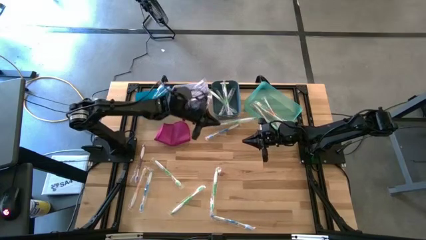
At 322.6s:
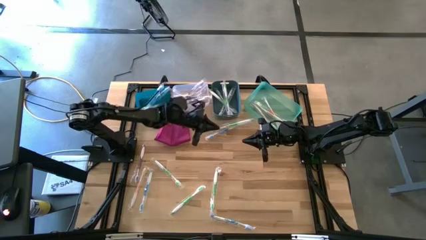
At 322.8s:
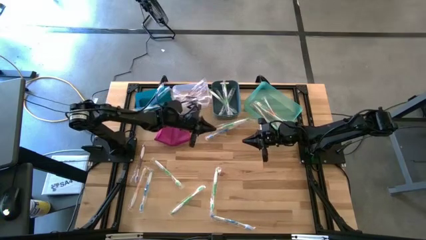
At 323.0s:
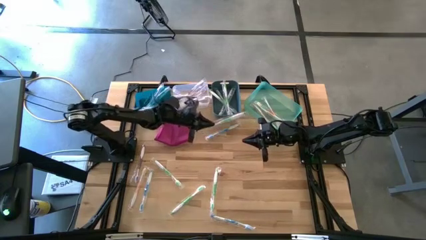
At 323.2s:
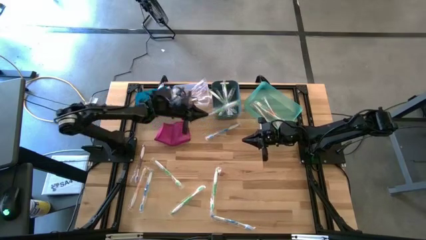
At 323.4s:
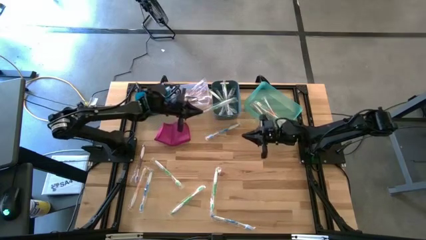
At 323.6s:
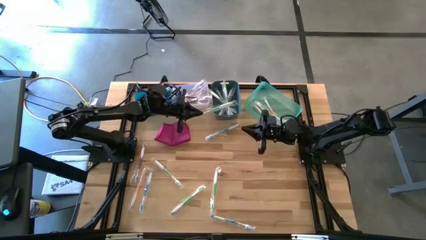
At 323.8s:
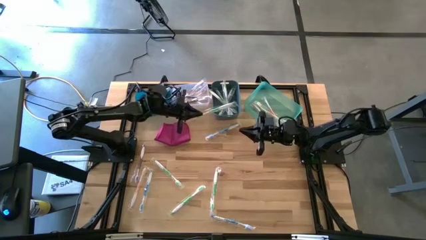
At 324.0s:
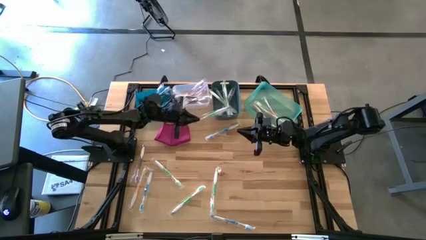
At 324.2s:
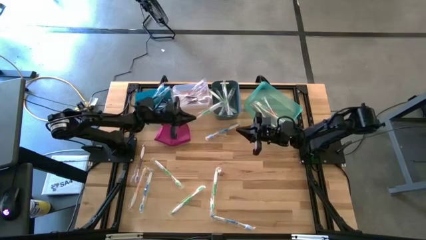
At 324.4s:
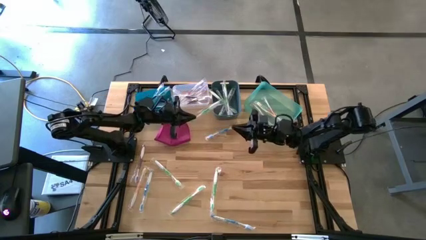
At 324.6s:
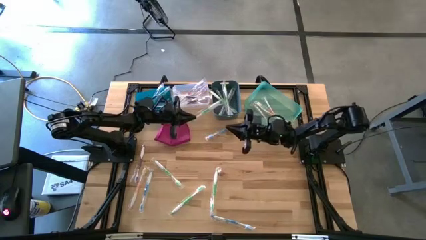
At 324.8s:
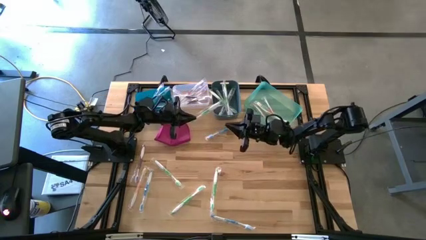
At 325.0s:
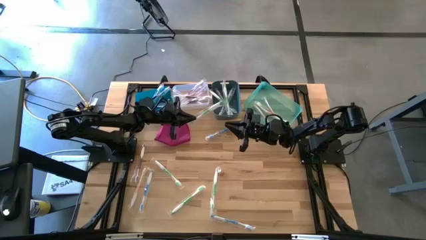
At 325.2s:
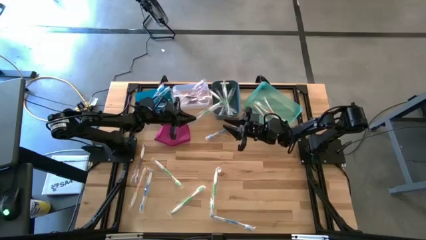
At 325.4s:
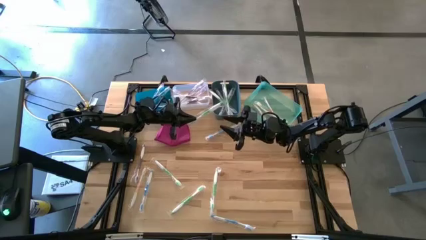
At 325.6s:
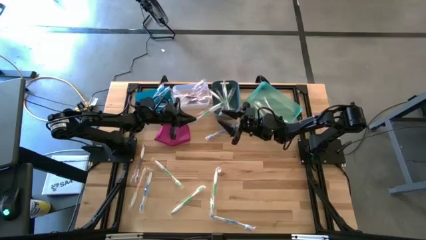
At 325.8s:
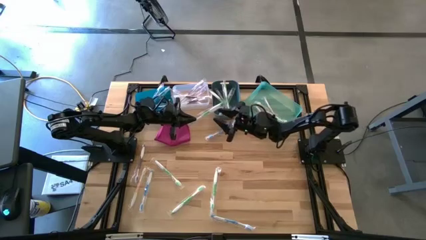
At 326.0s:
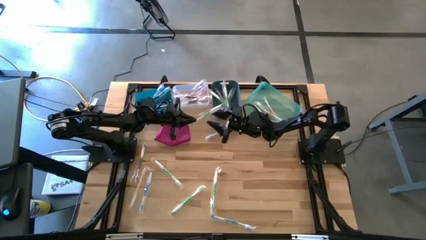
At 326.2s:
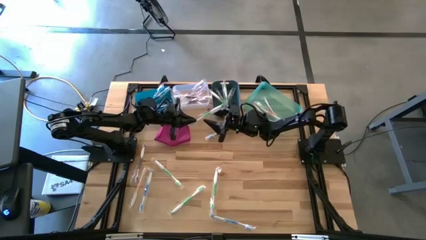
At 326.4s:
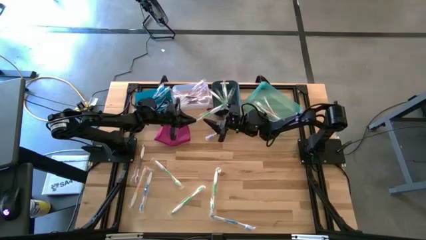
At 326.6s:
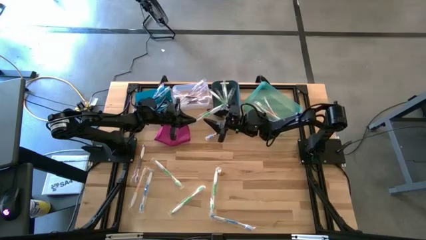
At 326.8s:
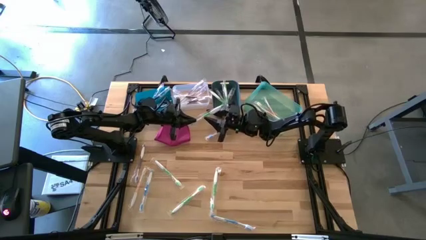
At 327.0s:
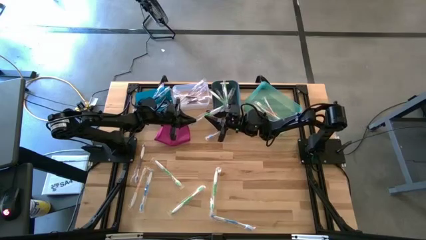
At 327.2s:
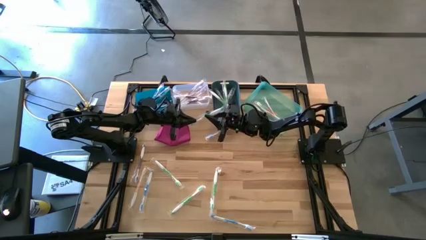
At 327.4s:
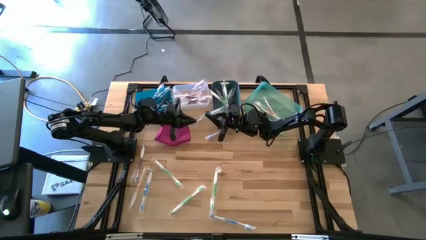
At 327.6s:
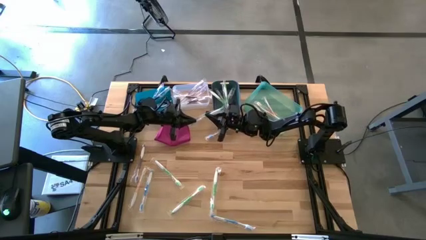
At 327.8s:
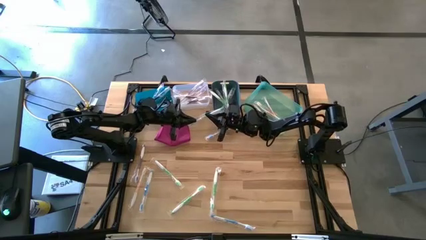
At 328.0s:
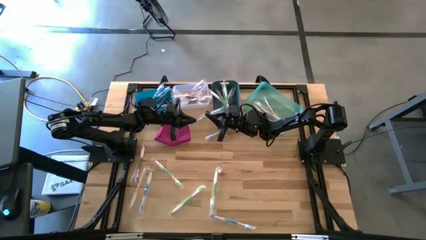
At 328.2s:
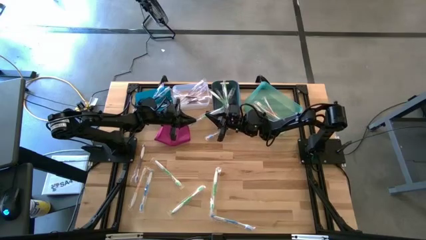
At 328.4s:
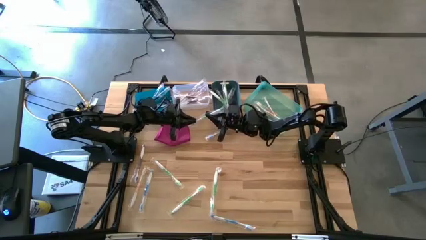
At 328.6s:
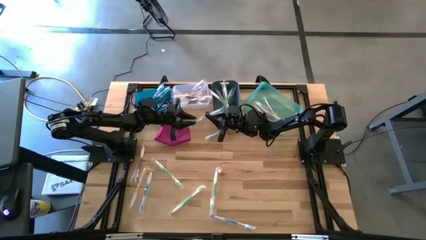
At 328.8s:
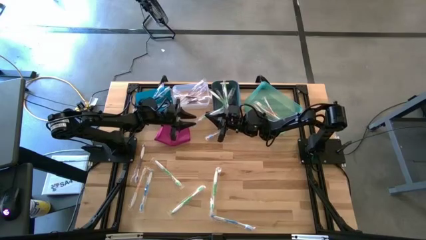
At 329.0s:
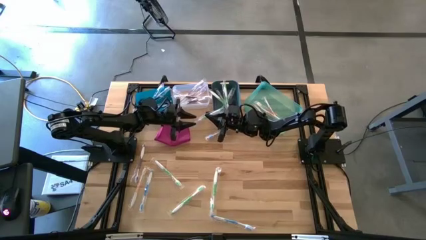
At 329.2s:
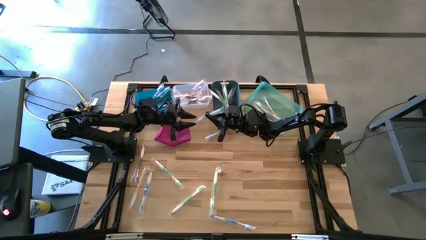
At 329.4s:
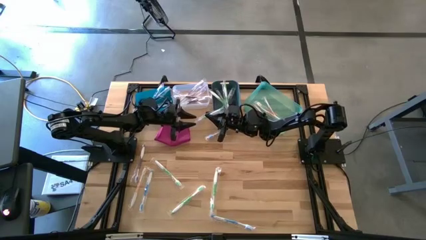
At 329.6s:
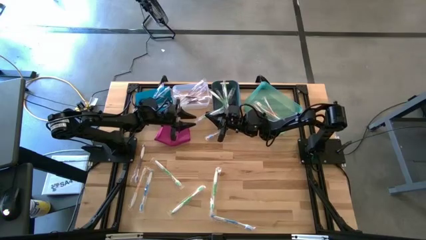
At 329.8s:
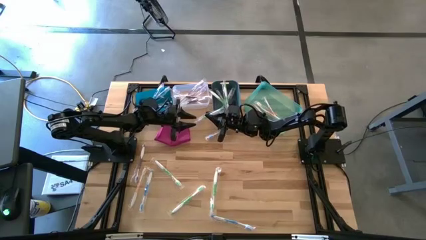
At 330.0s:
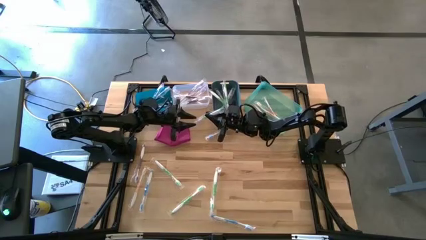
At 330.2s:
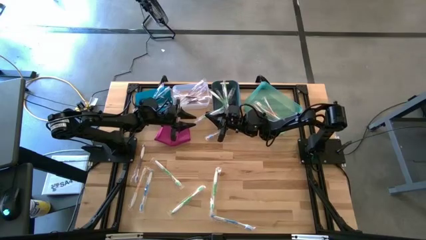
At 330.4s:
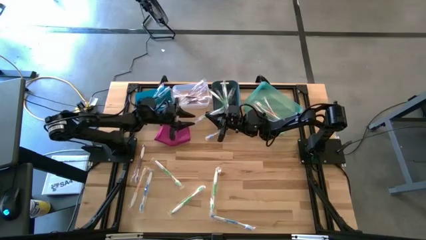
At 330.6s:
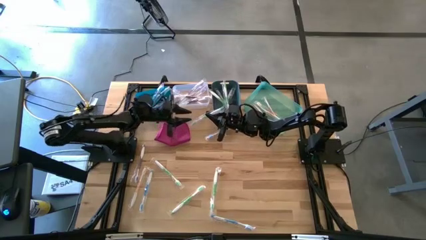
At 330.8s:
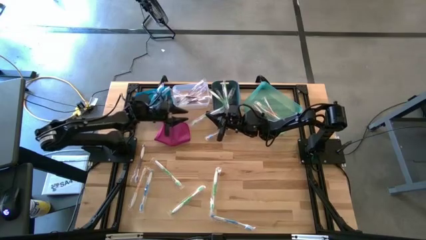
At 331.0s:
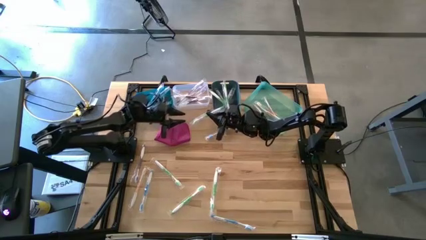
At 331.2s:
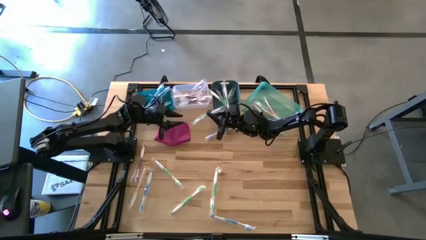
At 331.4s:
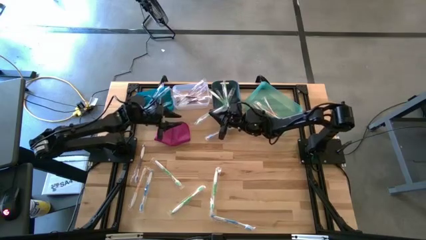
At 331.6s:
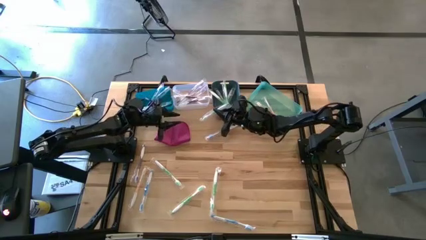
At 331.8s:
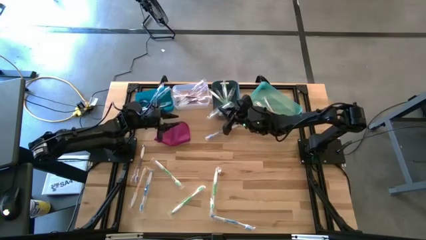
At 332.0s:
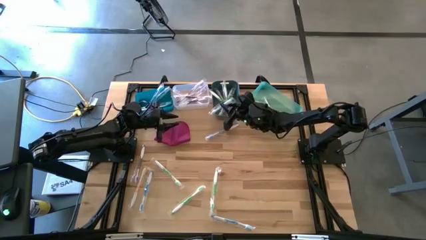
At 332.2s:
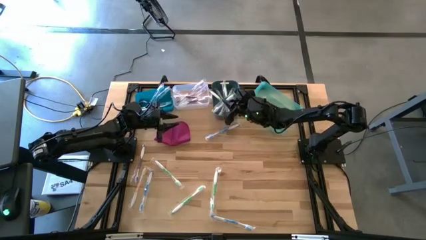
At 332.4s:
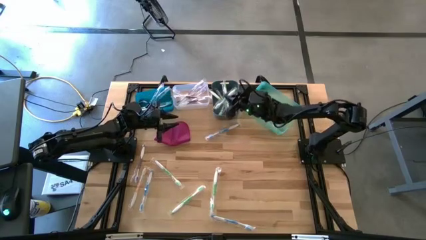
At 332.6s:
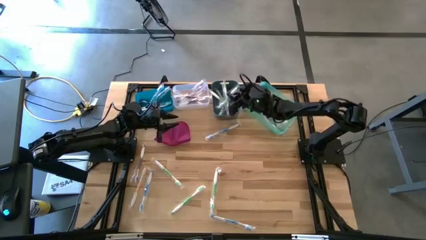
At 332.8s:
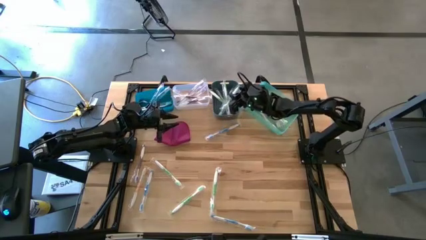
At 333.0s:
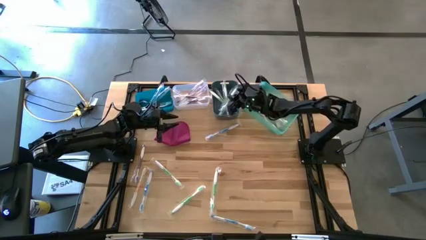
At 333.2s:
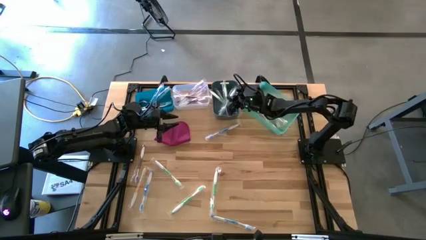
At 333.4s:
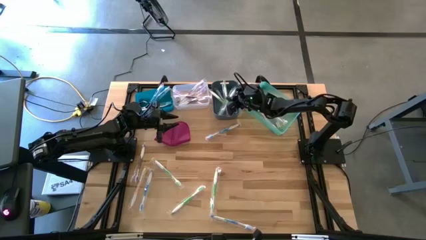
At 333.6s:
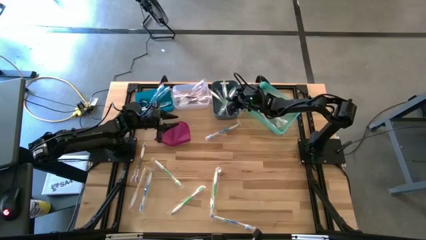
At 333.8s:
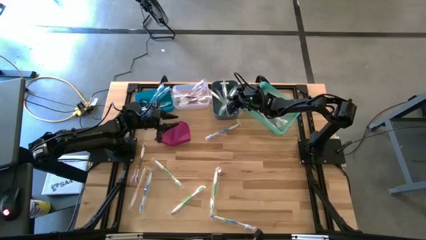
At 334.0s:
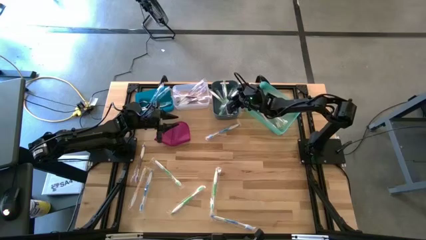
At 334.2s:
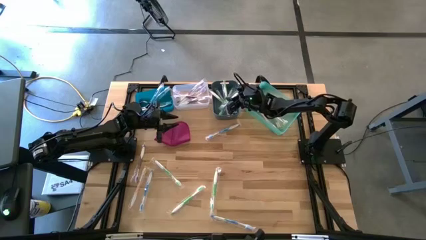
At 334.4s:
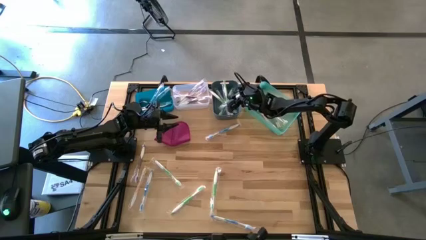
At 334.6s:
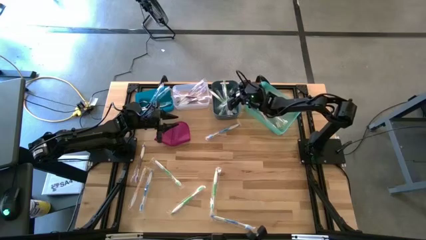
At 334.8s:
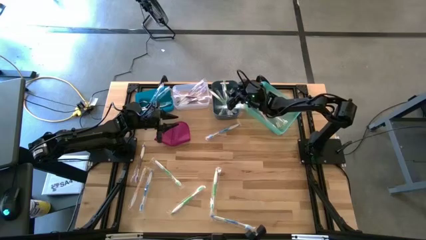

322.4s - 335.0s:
Task: Pick & Place Toothbrushes
Put the green toothbrush into the dark blue bin

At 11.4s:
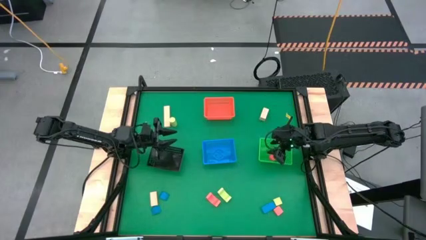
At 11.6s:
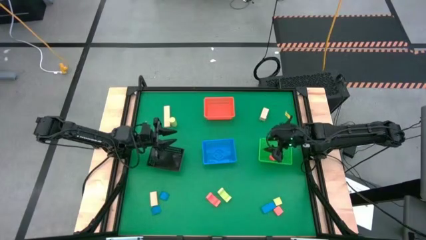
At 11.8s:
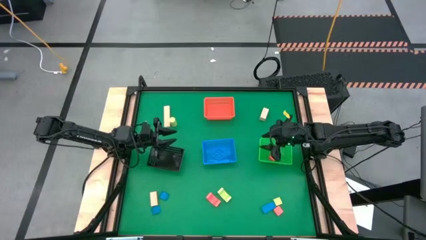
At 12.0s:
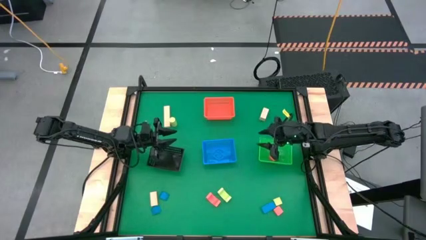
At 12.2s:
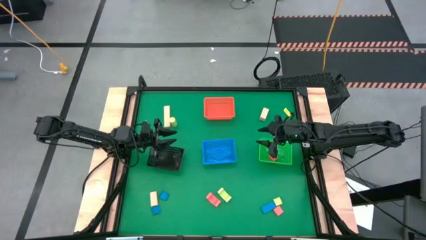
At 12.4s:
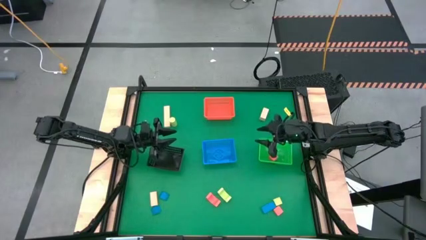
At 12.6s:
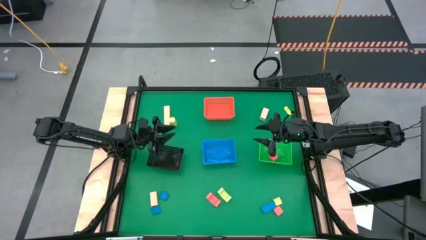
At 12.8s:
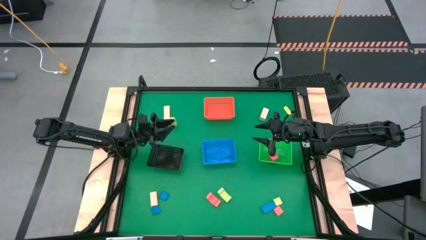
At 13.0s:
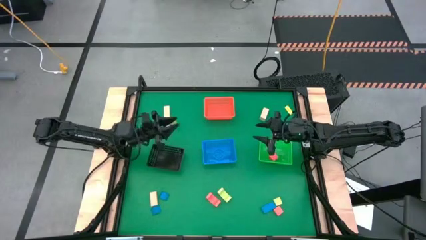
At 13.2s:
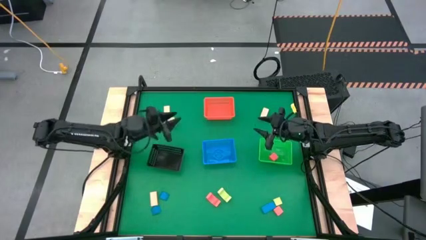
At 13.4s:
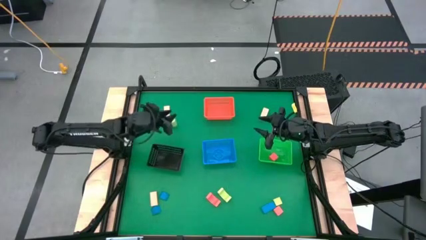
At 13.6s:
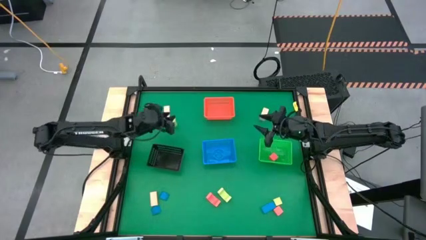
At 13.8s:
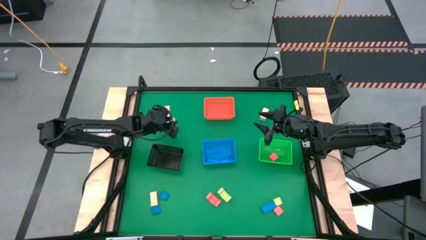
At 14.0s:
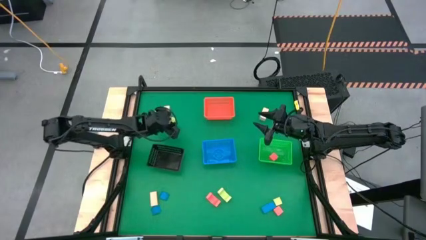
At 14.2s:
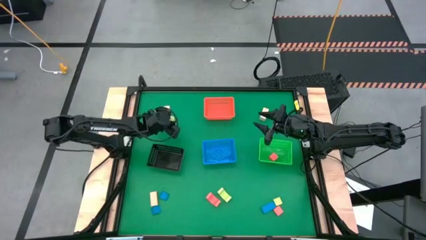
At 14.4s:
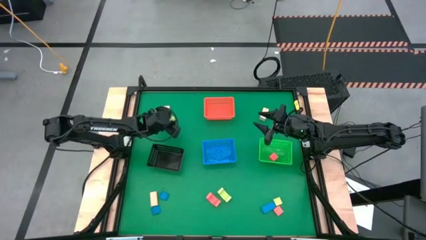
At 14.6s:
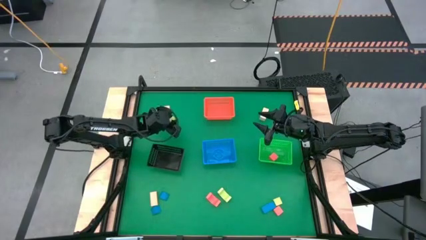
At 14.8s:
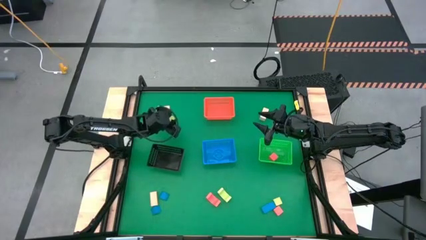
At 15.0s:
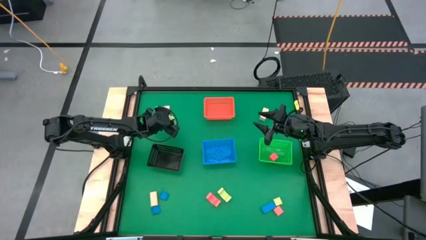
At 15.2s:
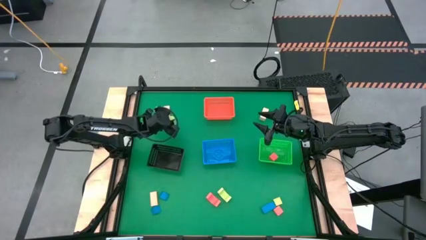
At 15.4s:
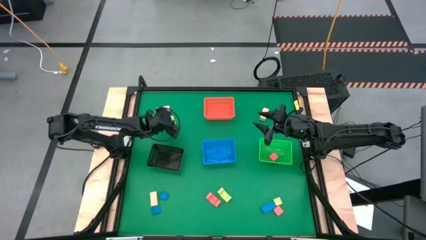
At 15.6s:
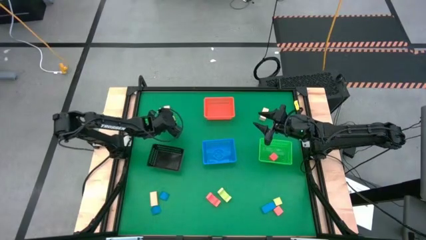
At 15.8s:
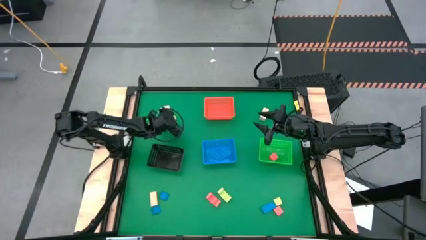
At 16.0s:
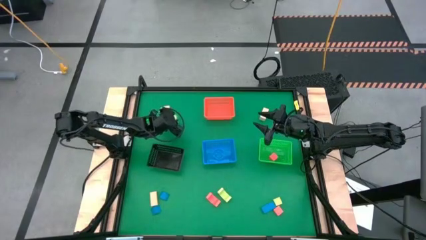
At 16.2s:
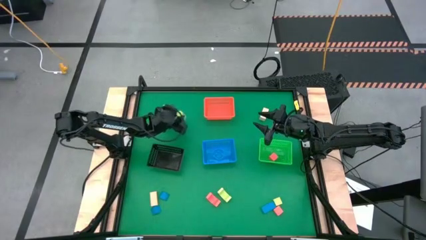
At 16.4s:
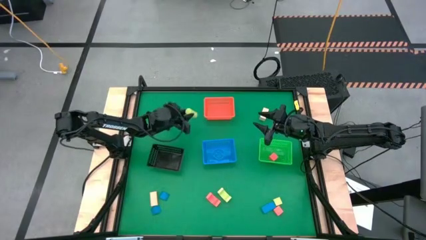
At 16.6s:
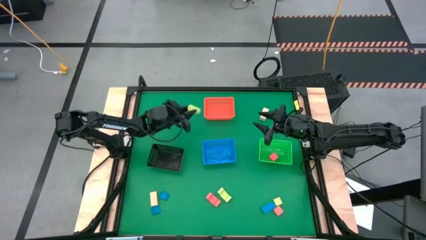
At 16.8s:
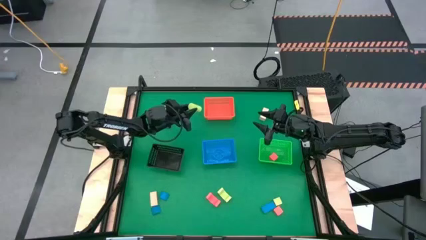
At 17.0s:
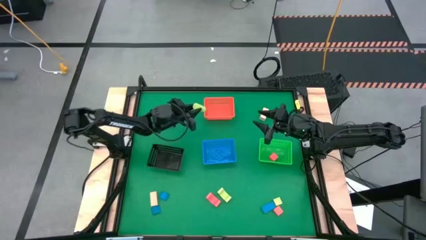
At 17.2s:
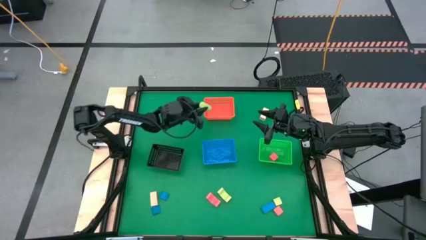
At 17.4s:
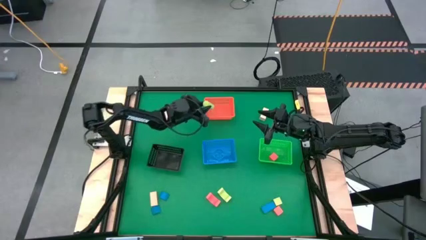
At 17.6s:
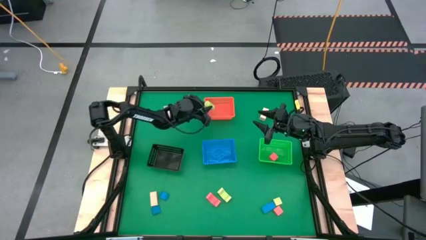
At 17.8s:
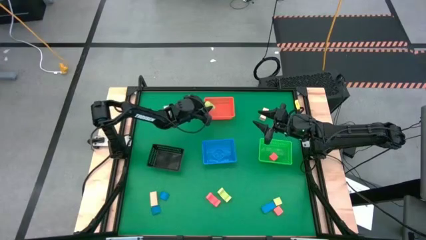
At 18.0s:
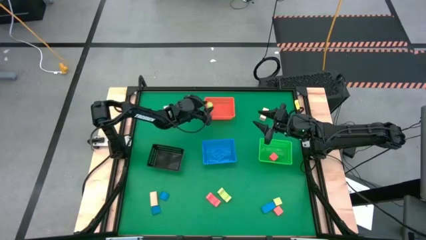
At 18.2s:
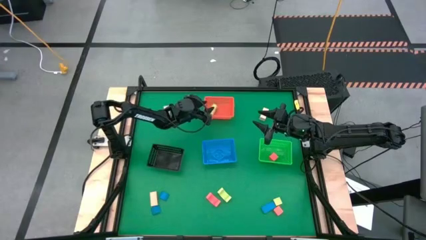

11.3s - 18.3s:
Task: Sort & place blocks by color
Put the top left green cylindrical block into the red bin
